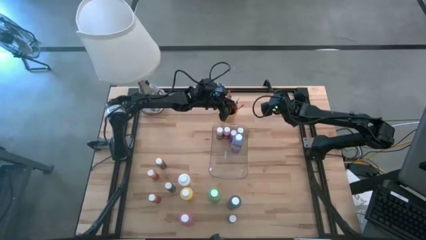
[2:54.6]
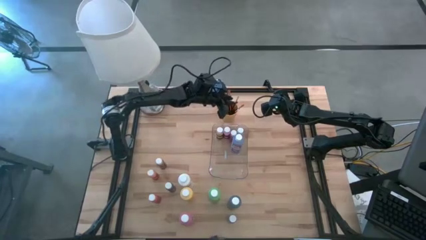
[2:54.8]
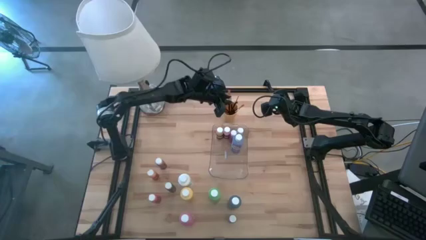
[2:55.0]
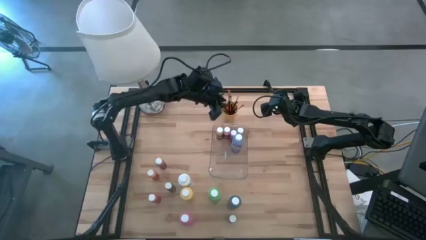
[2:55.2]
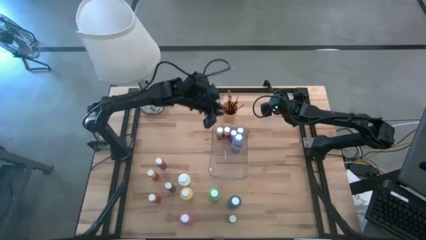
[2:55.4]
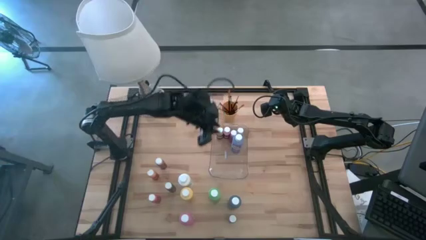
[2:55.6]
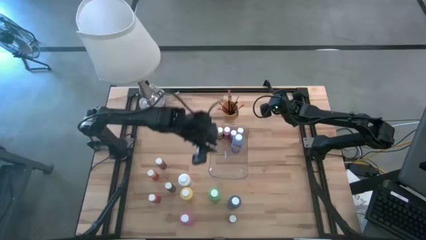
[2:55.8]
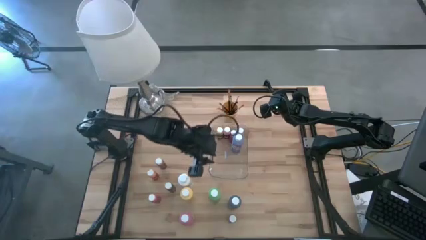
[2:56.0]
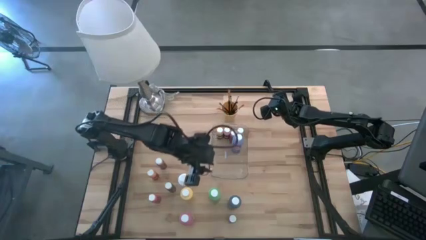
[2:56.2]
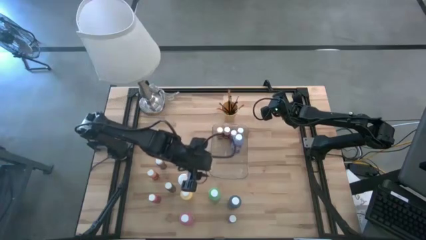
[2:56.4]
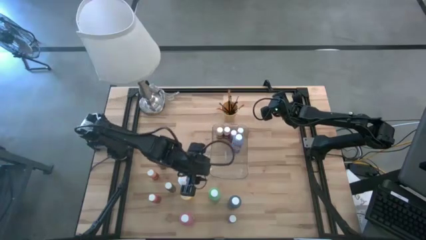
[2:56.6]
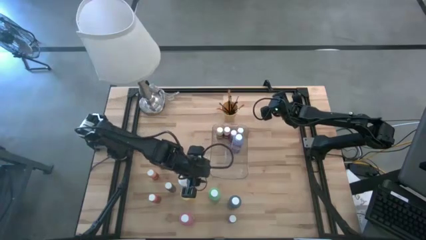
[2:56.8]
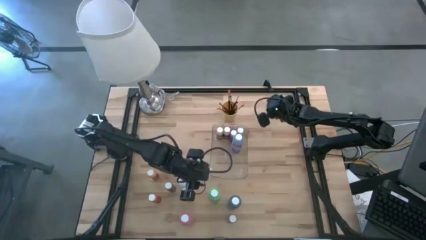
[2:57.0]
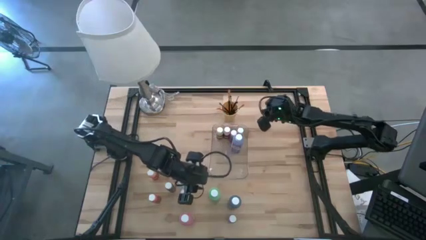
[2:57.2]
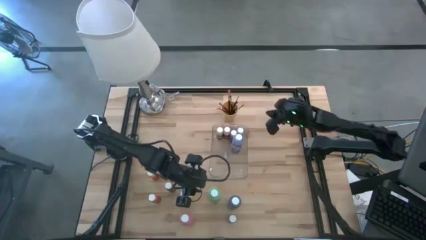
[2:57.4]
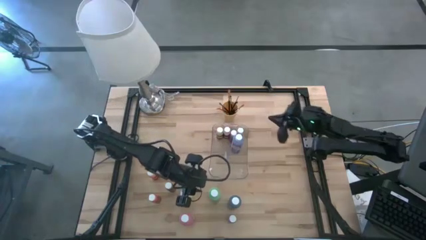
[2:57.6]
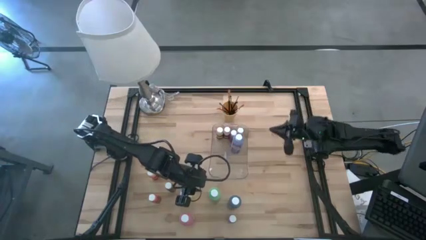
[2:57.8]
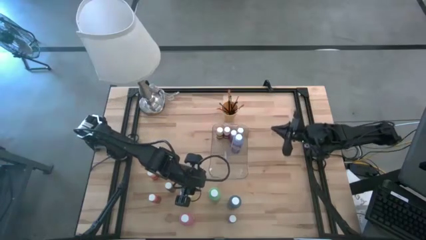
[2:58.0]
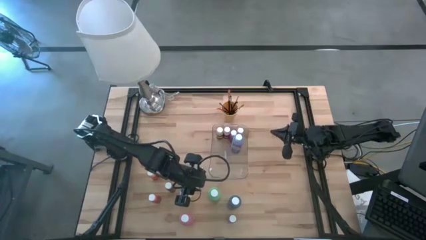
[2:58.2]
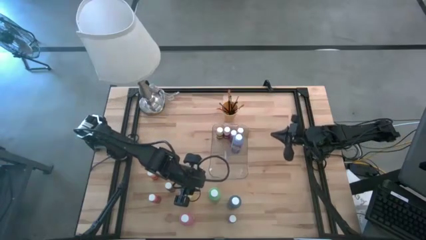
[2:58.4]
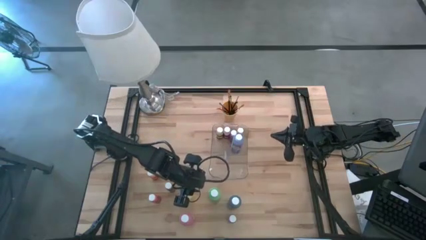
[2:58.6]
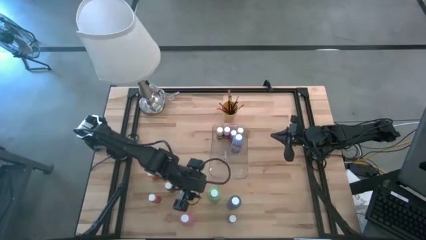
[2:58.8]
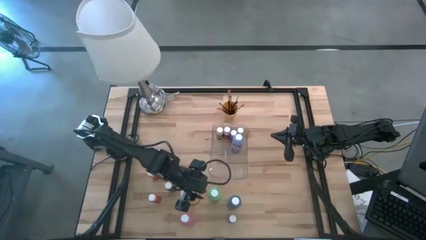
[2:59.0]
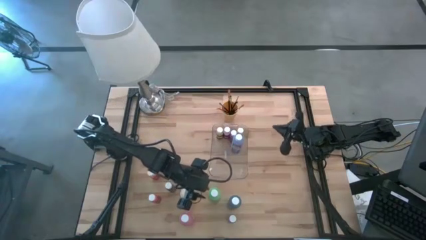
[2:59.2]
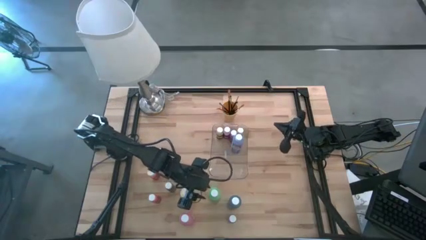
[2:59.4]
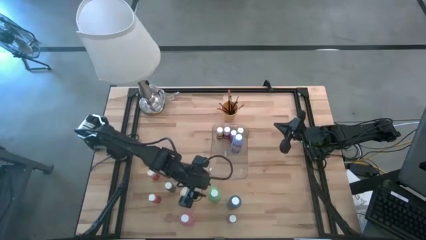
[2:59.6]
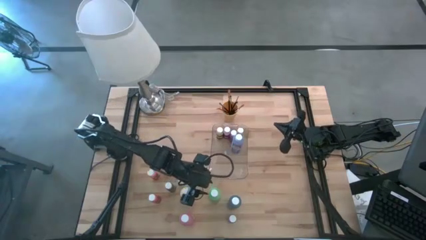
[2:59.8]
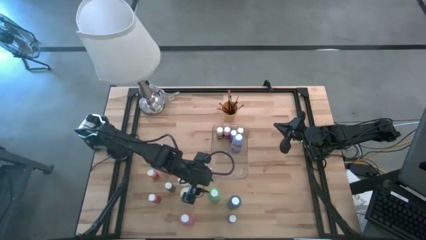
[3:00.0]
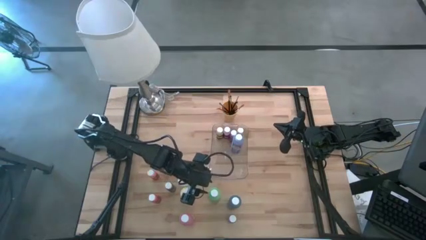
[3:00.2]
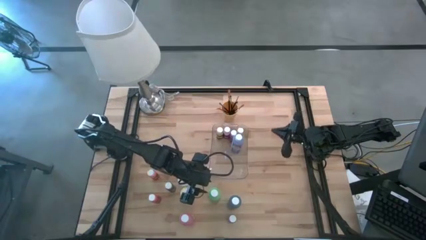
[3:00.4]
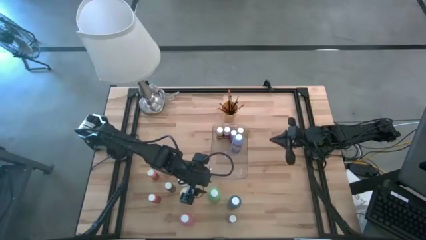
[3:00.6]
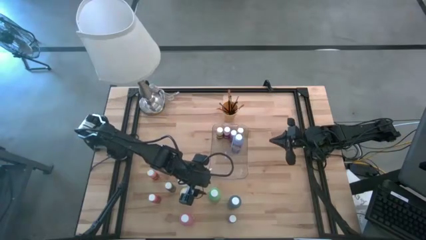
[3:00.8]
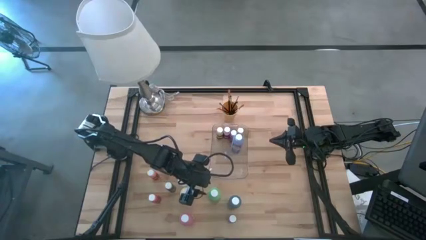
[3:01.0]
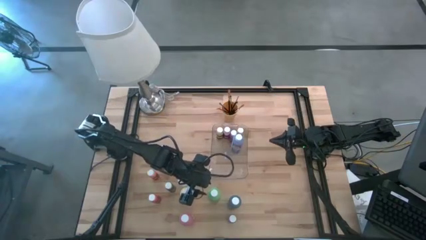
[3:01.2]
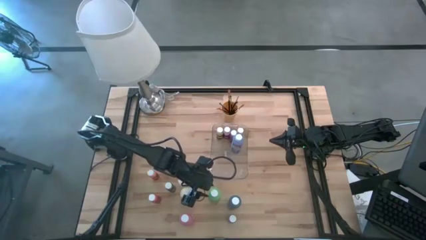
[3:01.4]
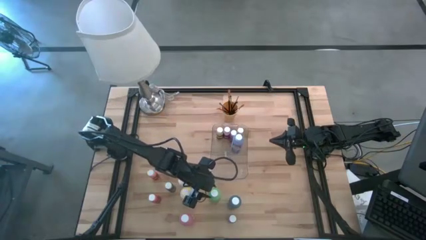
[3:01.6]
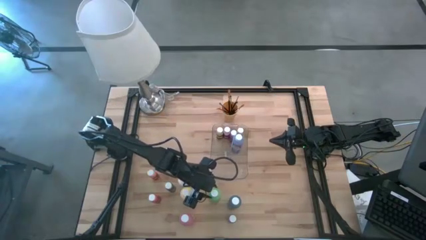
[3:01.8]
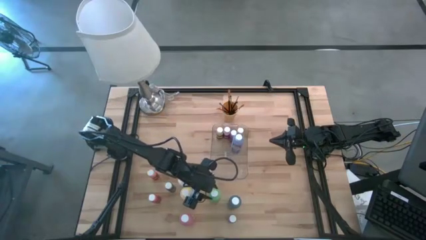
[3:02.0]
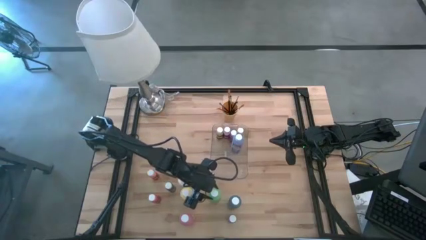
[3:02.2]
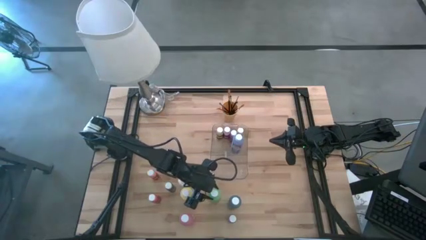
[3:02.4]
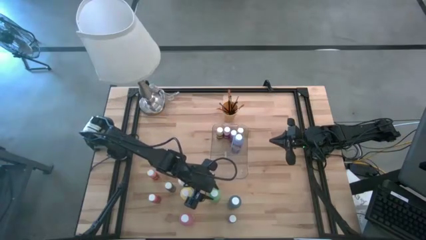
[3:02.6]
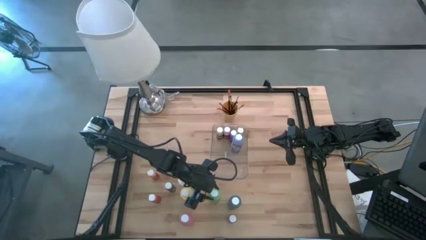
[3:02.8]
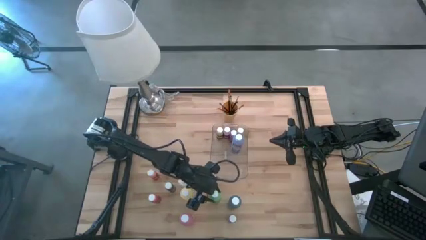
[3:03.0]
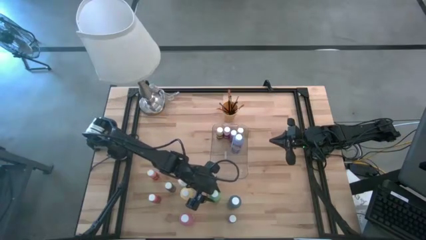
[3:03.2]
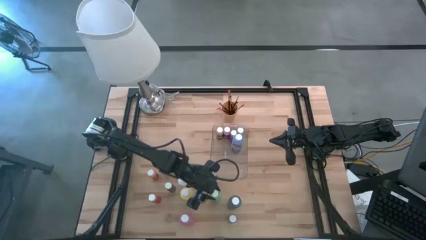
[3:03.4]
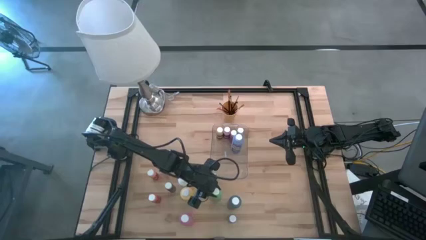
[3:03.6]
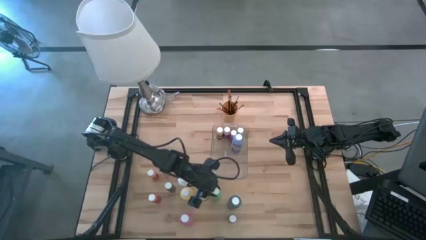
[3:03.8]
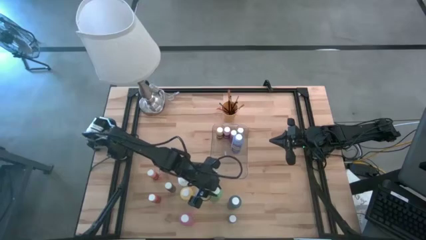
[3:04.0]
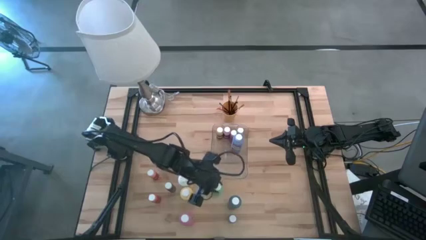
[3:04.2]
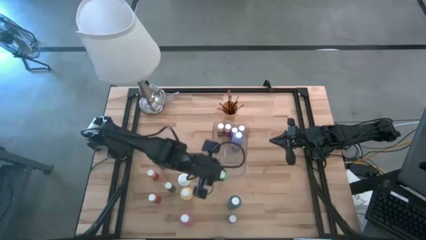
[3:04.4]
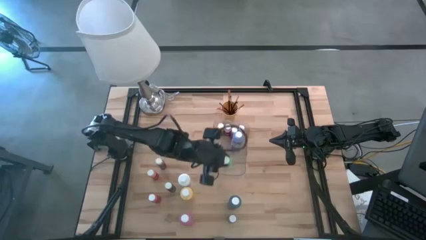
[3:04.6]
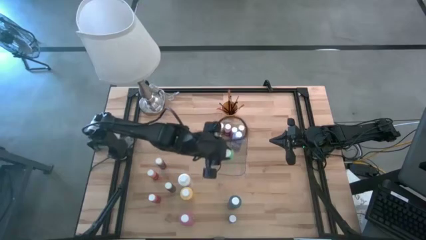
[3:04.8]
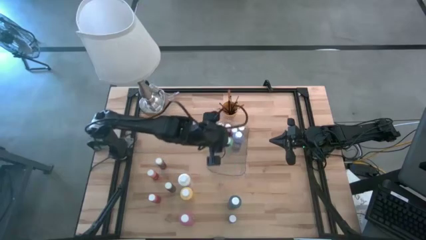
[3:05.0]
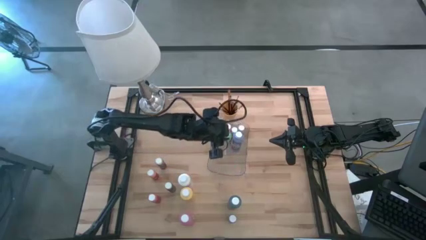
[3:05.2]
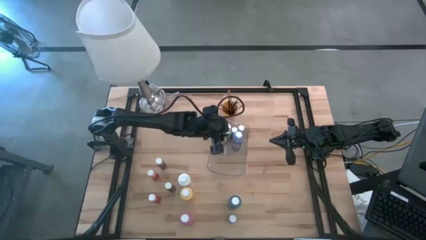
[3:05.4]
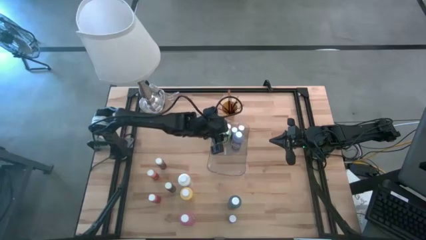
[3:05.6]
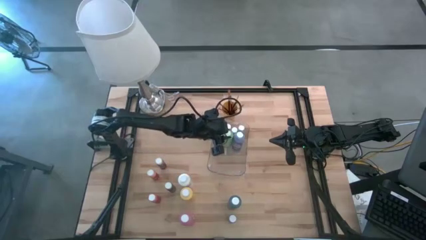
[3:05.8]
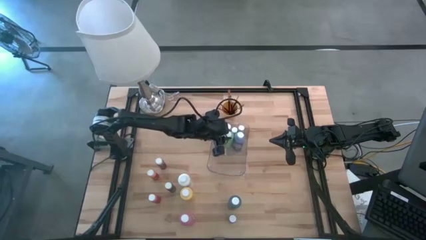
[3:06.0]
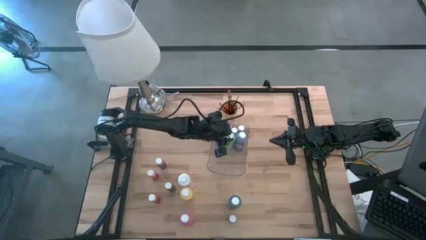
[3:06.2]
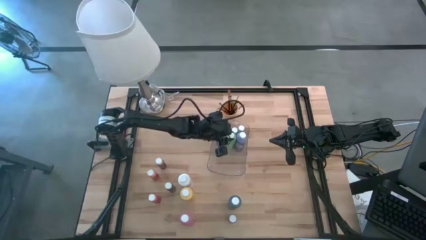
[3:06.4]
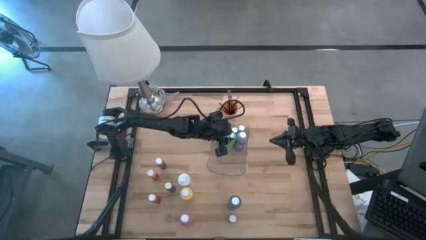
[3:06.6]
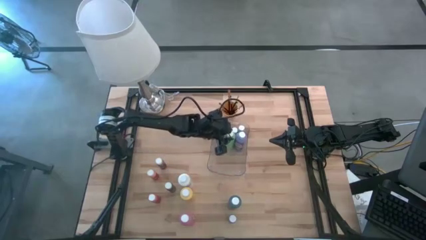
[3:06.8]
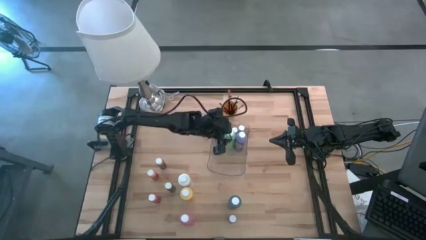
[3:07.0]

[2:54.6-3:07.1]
Task: Pick & Place Paint Supplies
Put the large light green paint bottle into the transparent bin

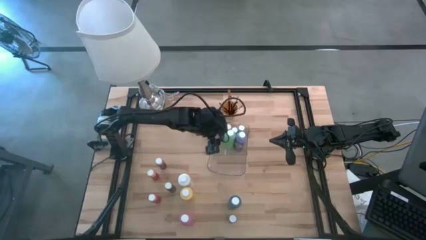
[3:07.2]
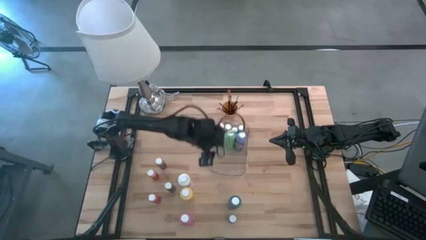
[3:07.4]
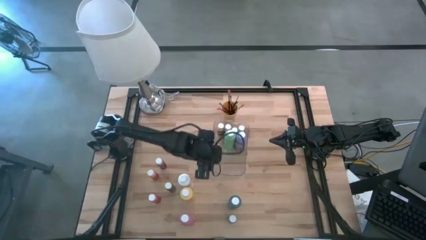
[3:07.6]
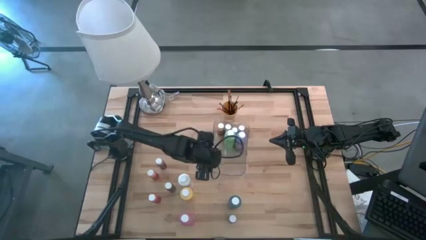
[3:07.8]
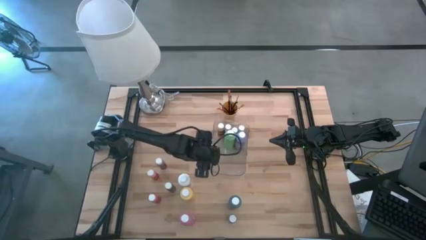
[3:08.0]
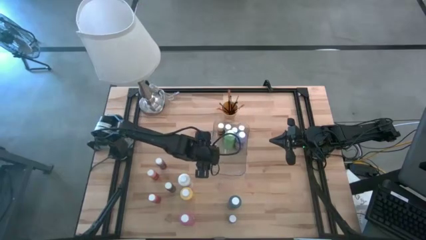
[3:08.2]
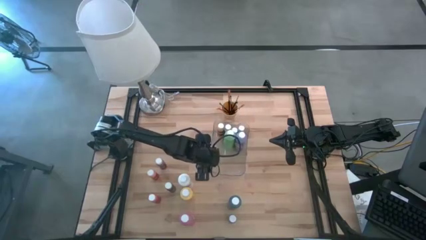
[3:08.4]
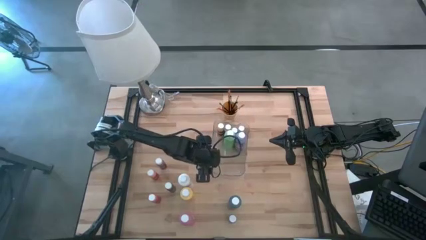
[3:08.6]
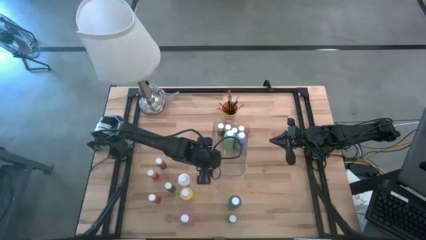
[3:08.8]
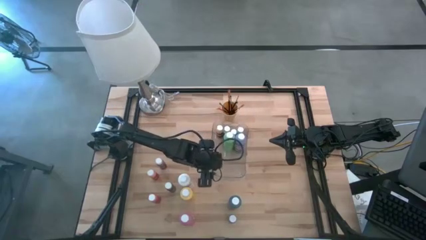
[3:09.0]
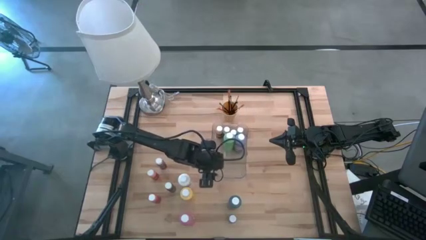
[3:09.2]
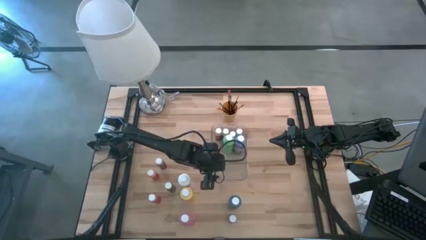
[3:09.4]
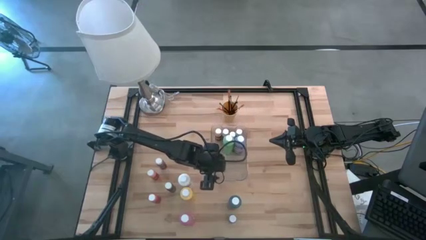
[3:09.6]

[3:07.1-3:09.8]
Adjust the transparent bin
